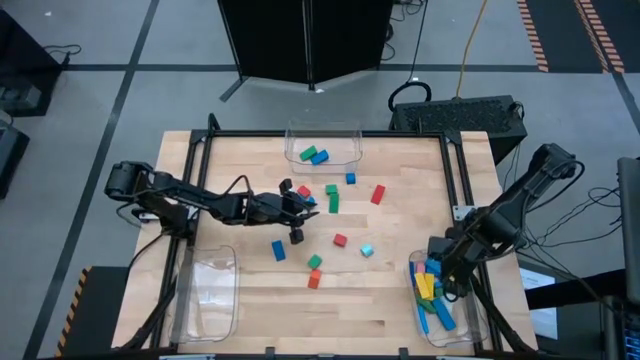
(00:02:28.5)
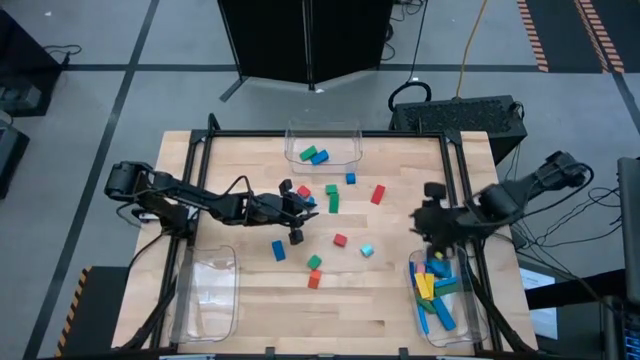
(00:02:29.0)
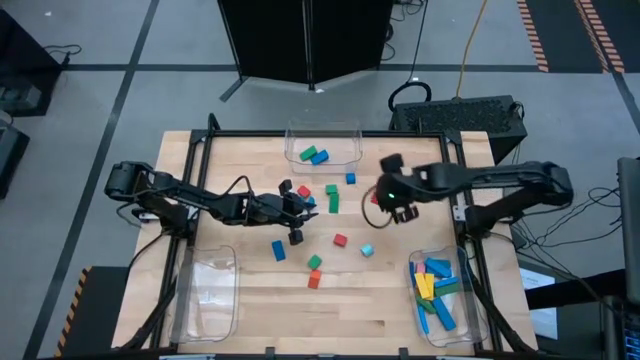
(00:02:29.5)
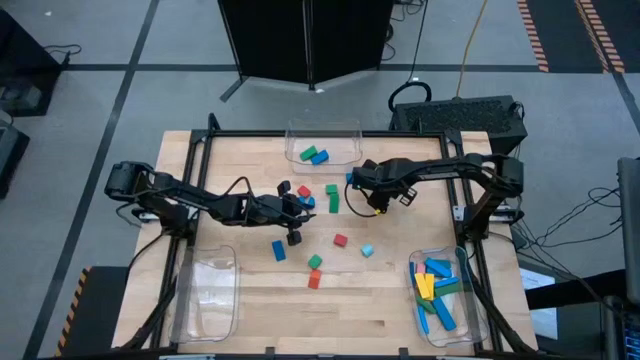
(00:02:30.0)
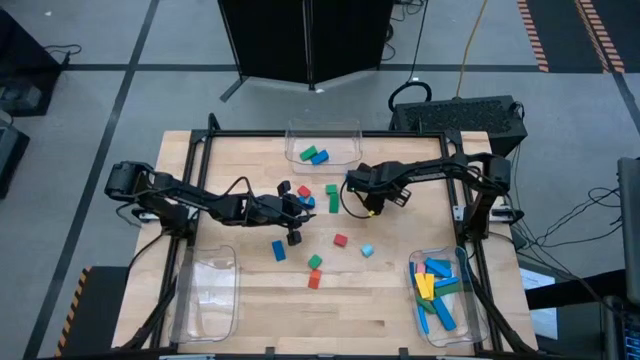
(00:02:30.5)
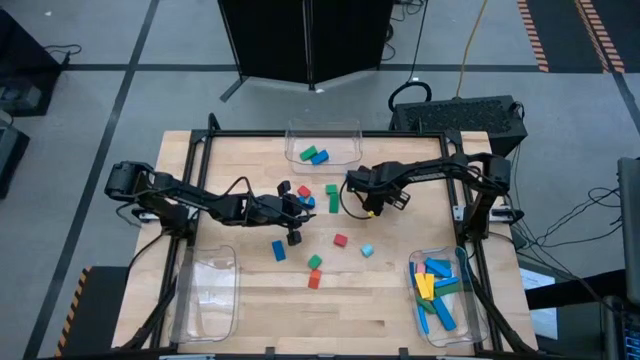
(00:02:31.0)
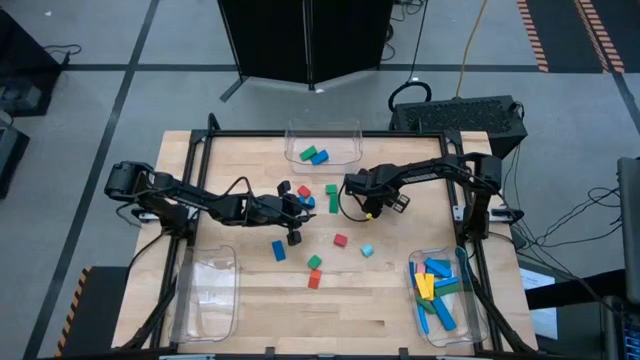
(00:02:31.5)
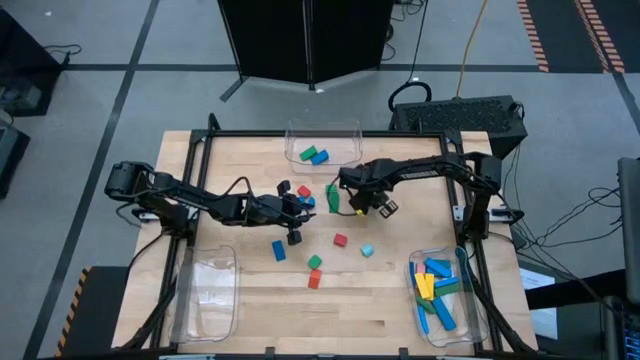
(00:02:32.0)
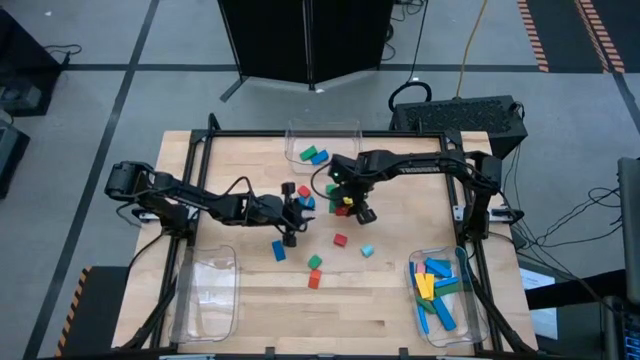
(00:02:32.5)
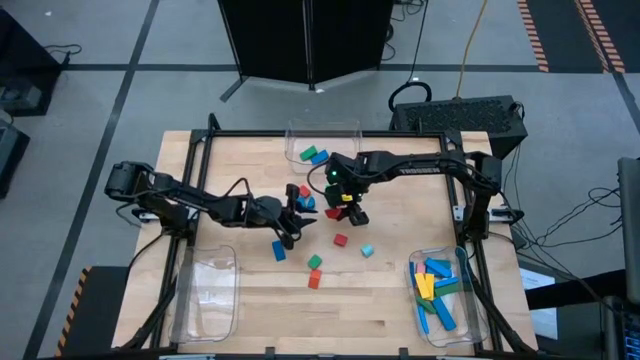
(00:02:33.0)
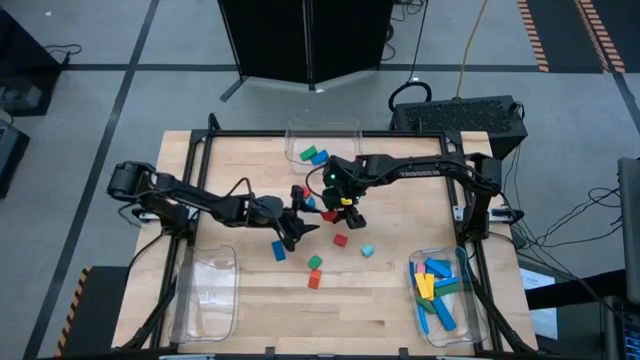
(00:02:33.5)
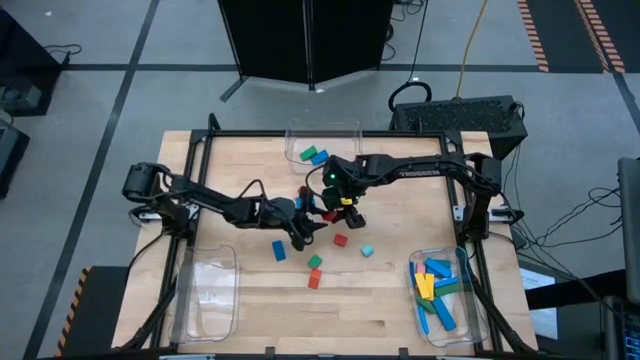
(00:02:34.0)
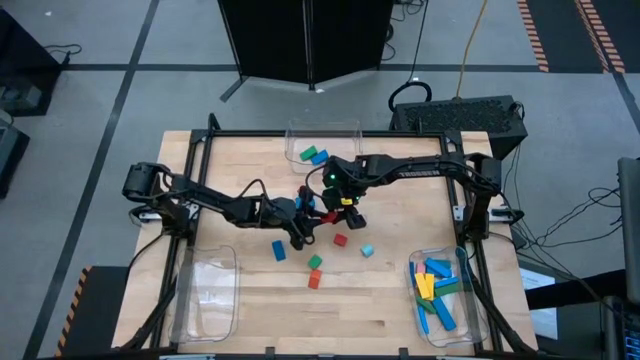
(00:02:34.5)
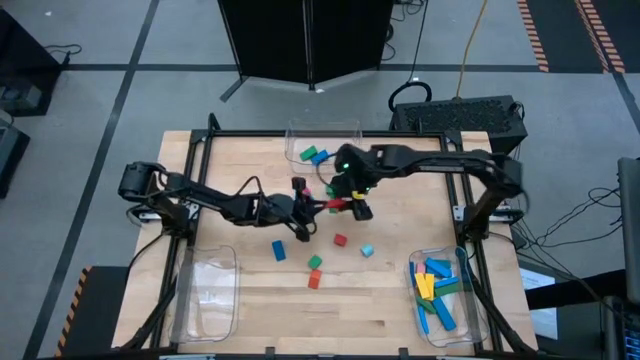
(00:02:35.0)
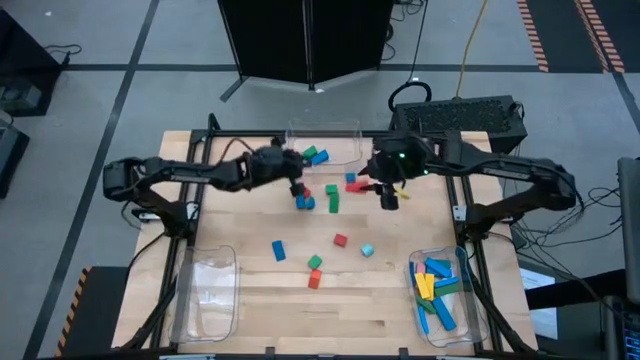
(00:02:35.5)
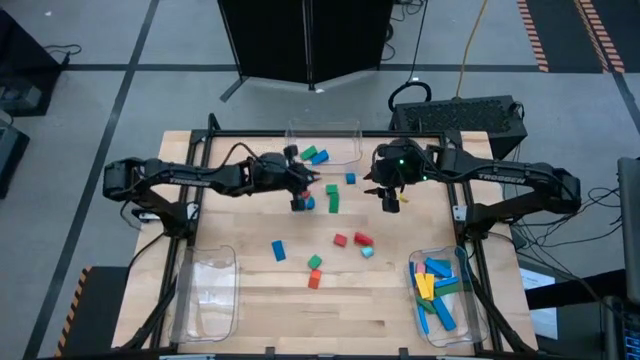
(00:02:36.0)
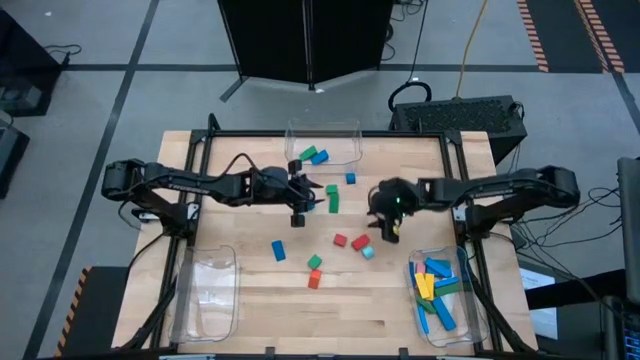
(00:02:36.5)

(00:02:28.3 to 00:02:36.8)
Task: Sort blocks by size
Put the red triangle block into the top transparent bin

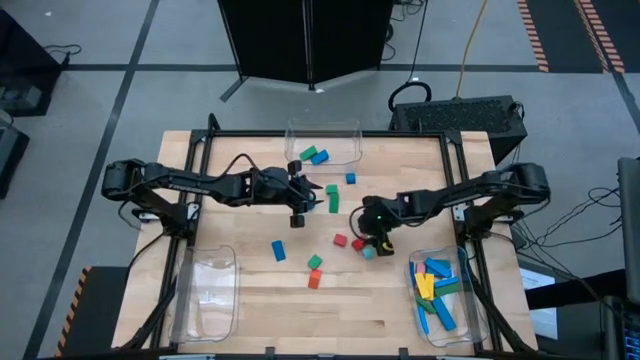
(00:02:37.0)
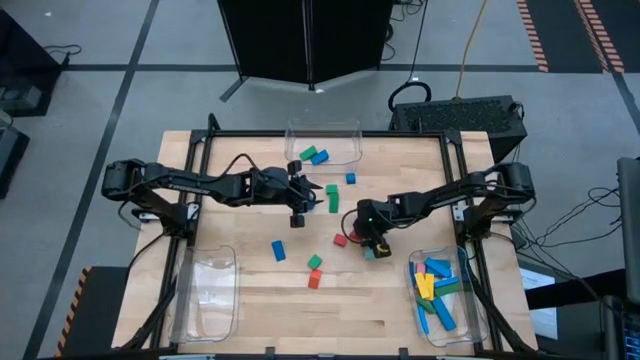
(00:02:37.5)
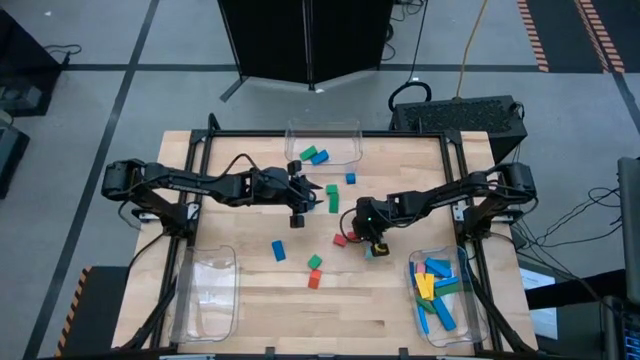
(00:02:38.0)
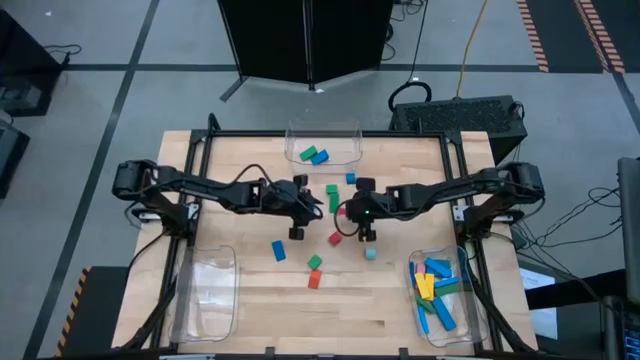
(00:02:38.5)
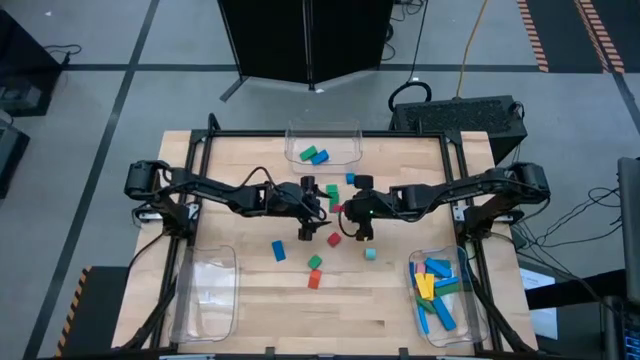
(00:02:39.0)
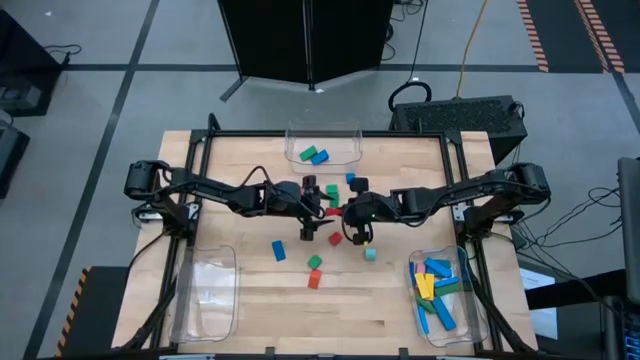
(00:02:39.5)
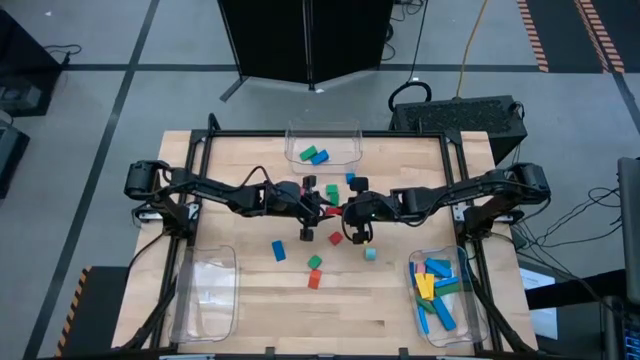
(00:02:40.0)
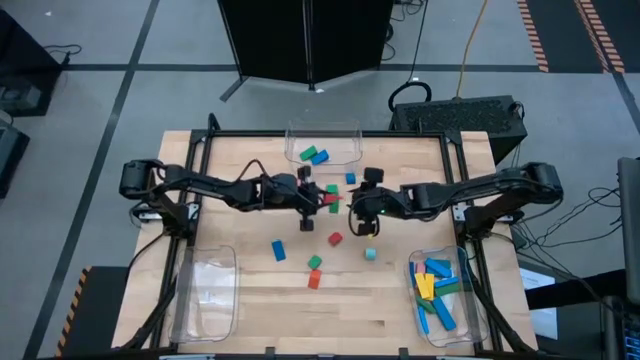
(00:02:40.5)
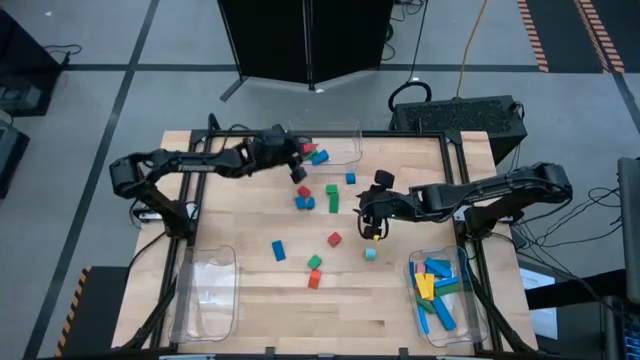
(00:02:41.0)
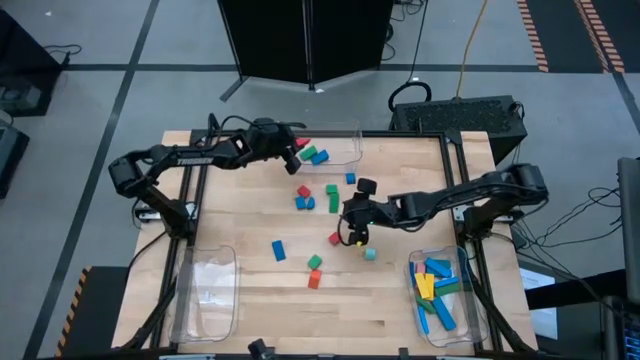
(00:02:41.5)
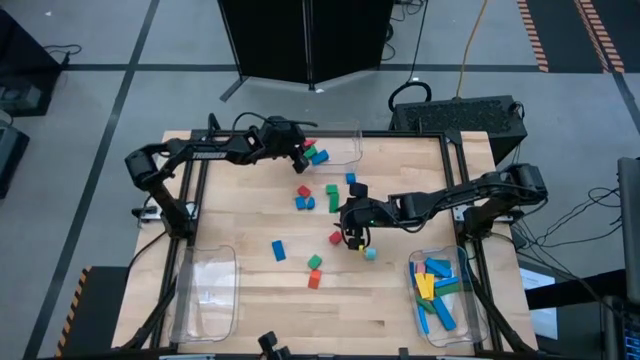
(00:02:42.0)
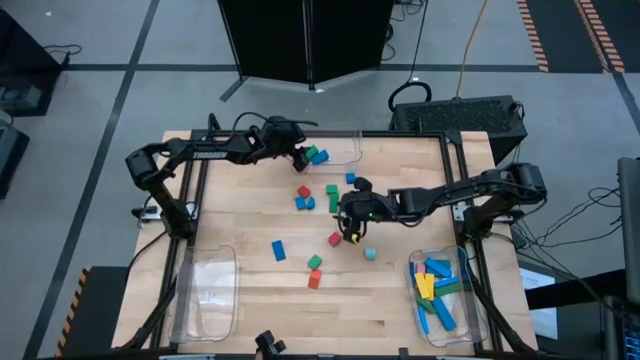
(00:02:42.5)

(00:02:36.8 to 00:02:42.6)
Put the red triangle block into the top transparent bin

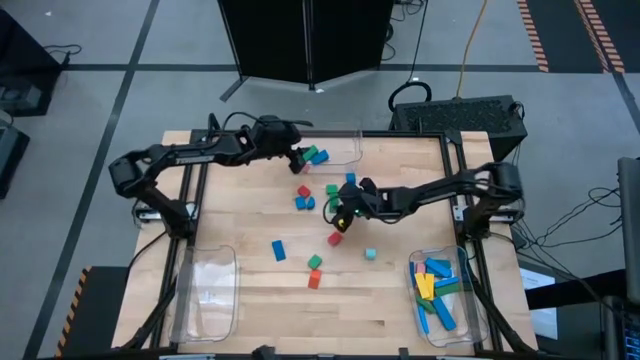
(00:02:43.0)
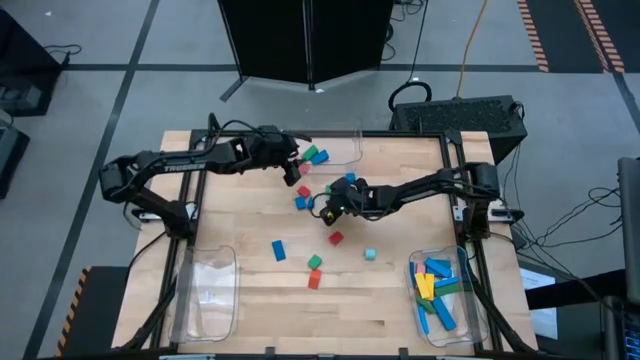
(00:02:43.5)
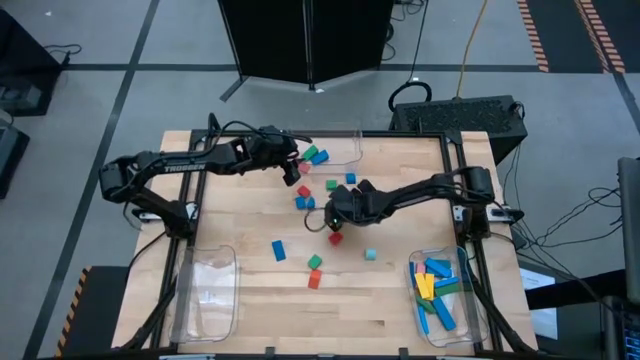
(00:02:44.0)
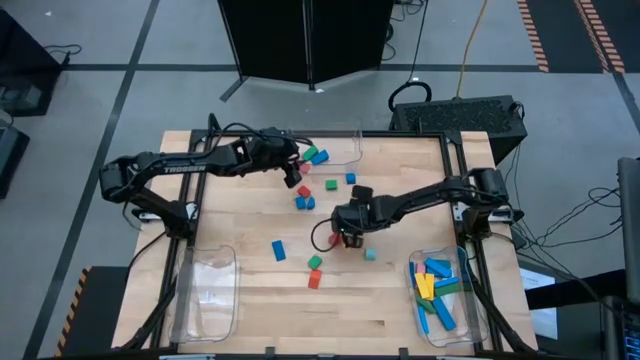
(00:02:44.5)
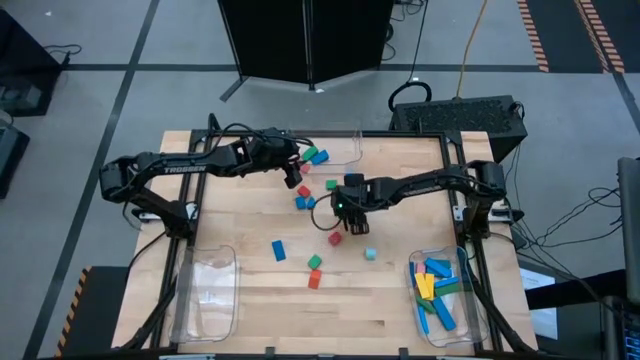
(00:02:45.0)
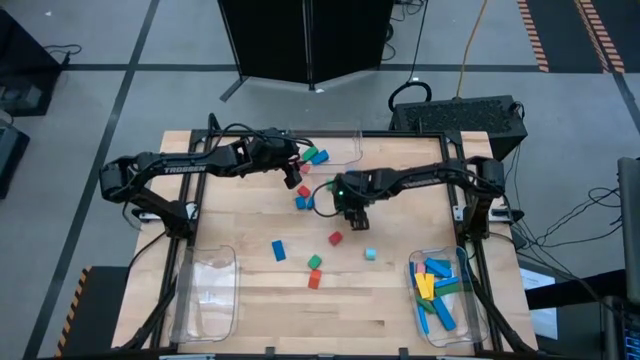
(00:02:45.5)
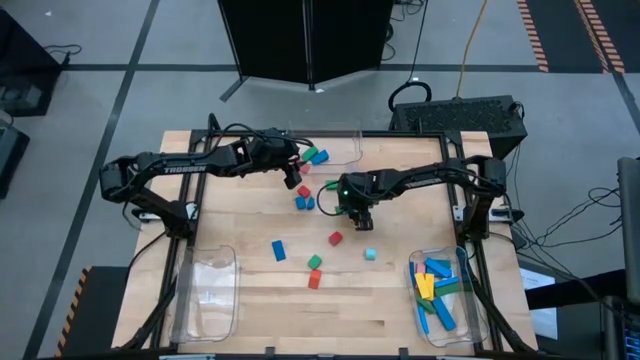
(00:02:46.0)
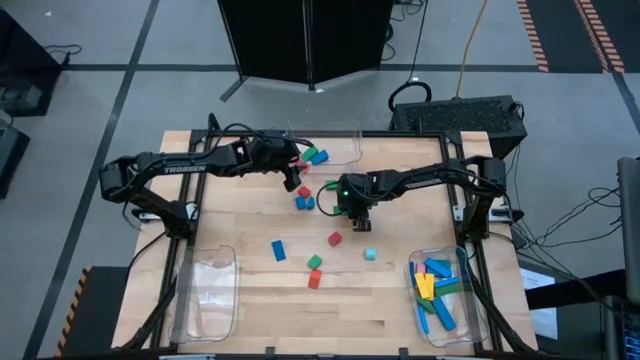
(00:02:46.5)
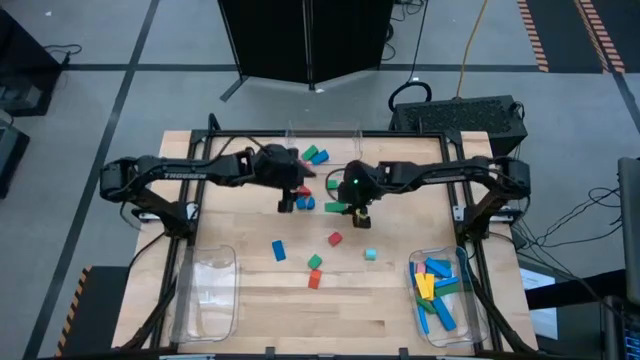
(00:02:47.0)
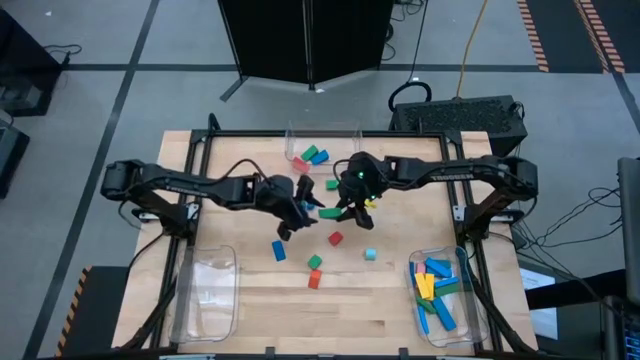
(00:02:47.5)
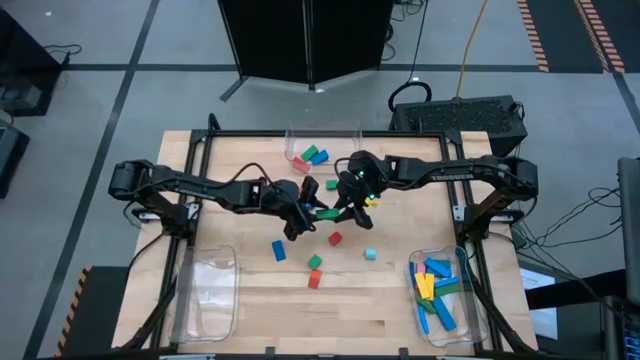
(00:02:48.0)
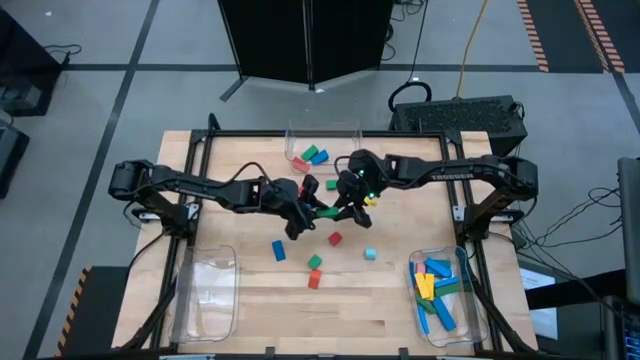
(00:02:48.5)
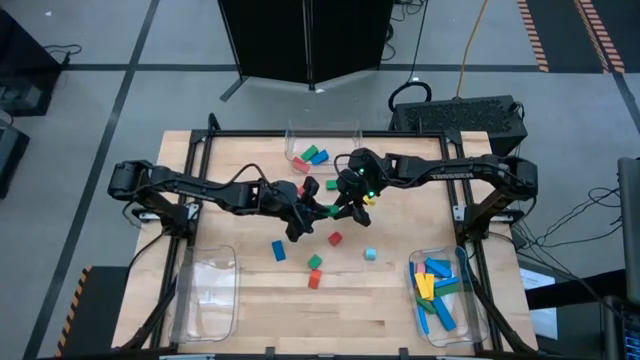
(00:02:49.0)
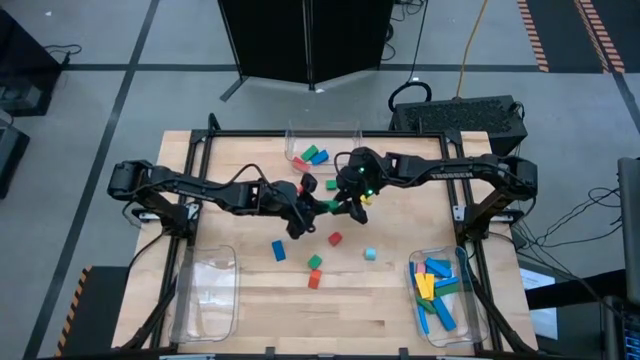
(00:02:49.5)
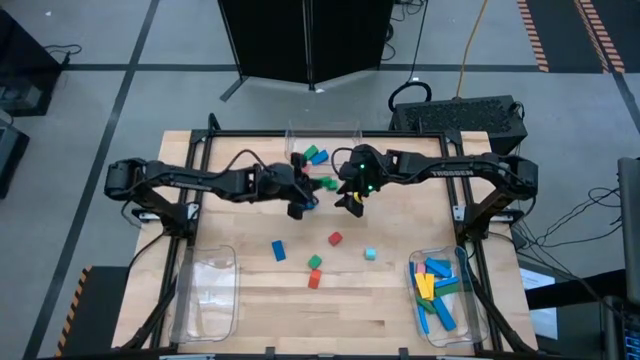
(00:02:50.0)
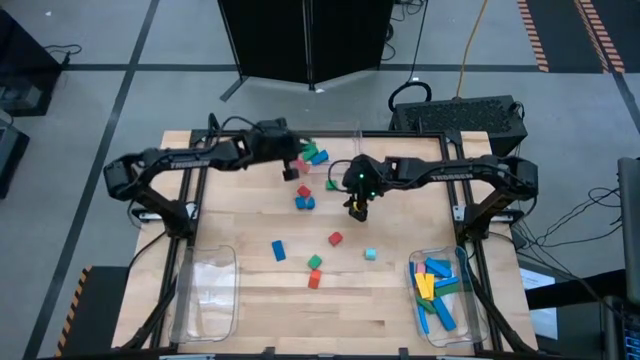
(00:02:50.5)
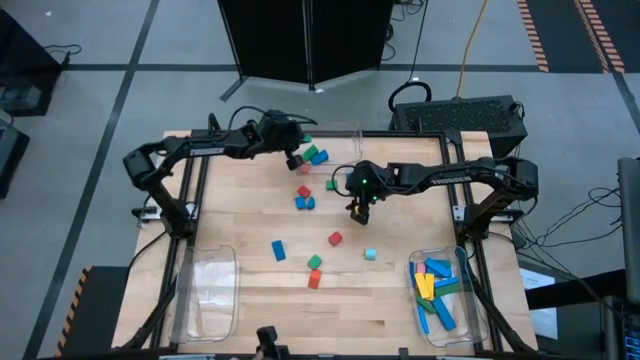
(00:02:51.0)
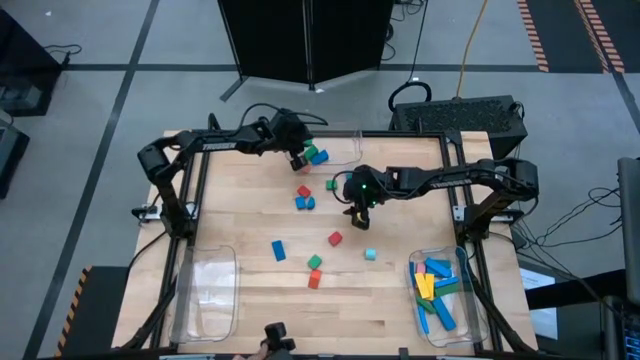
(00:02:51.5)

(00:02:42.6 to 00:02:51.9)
Put the green triangle block into the top transparent bin
